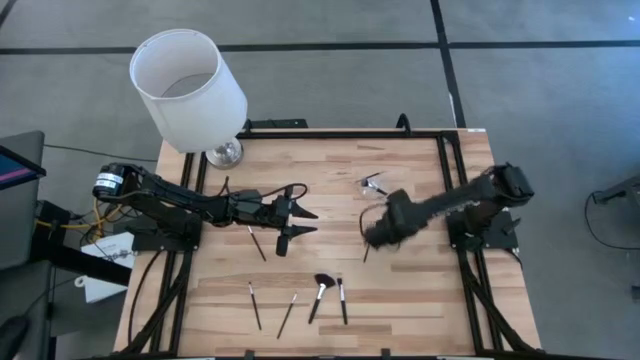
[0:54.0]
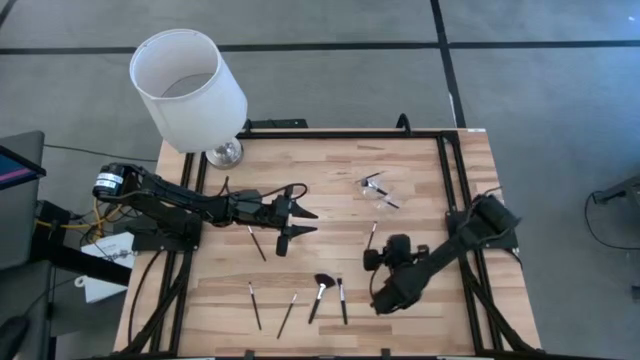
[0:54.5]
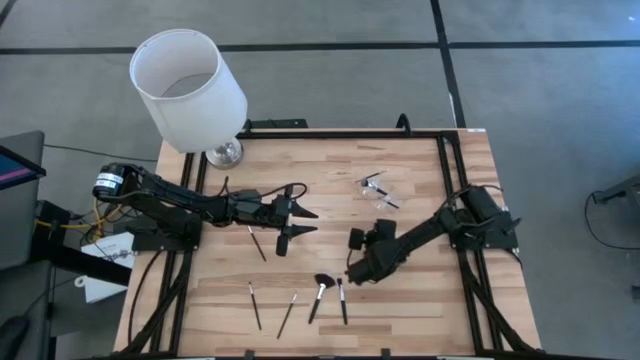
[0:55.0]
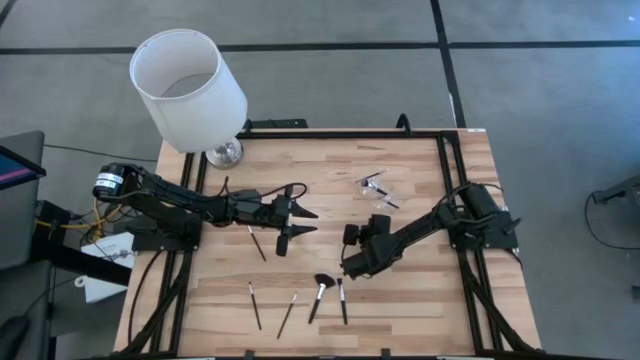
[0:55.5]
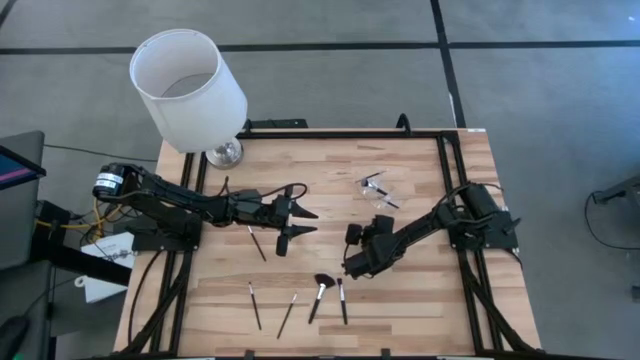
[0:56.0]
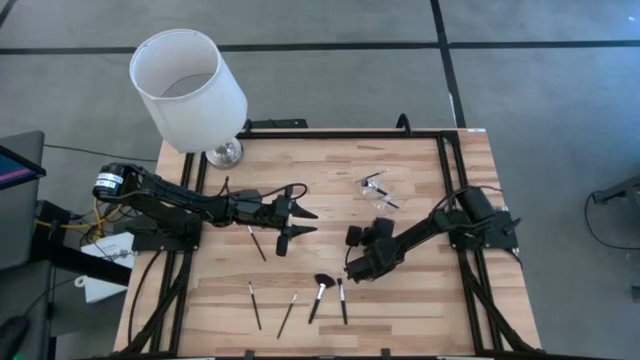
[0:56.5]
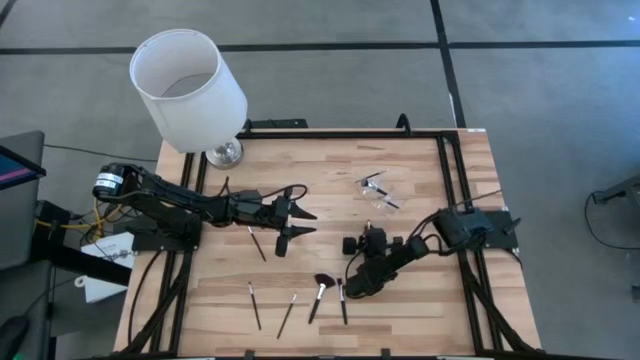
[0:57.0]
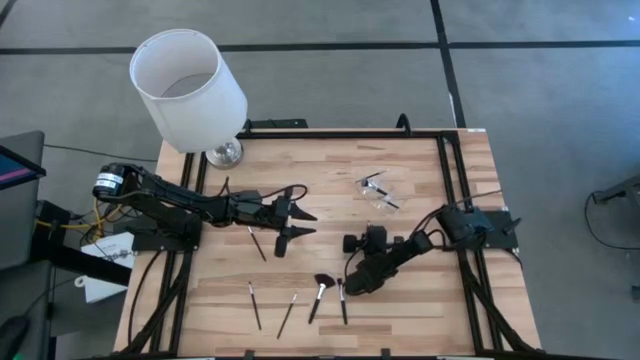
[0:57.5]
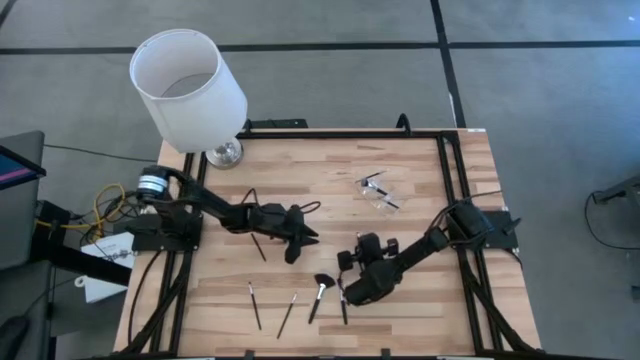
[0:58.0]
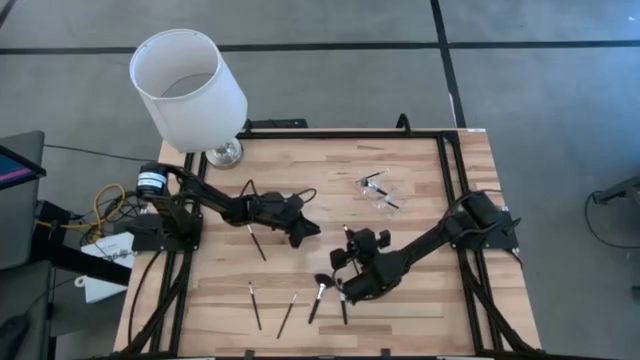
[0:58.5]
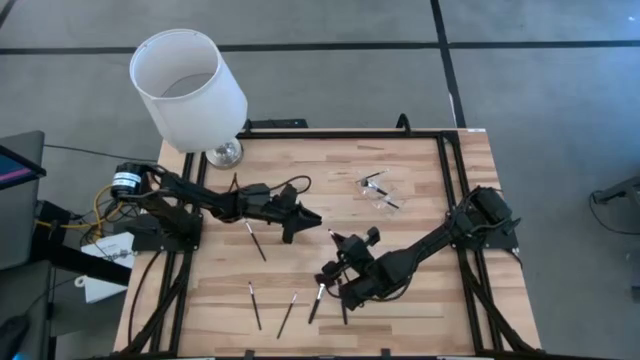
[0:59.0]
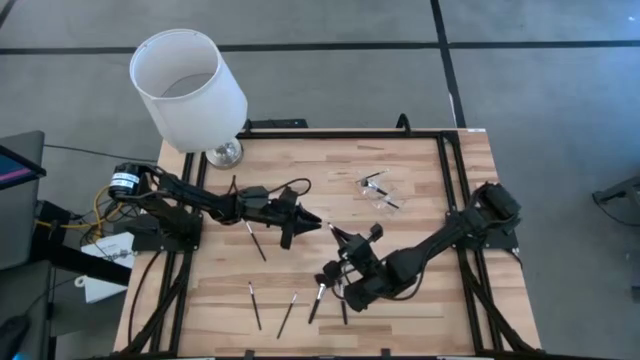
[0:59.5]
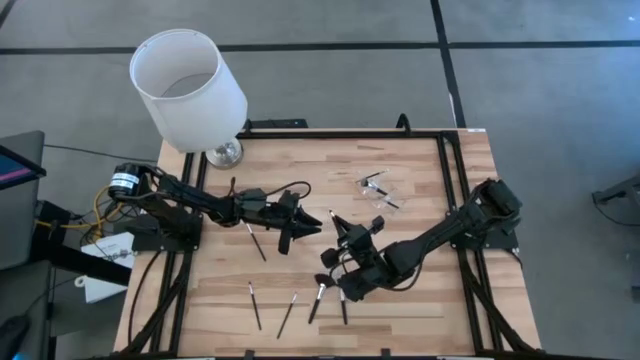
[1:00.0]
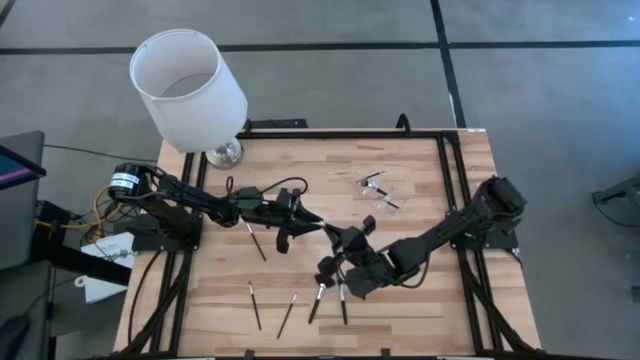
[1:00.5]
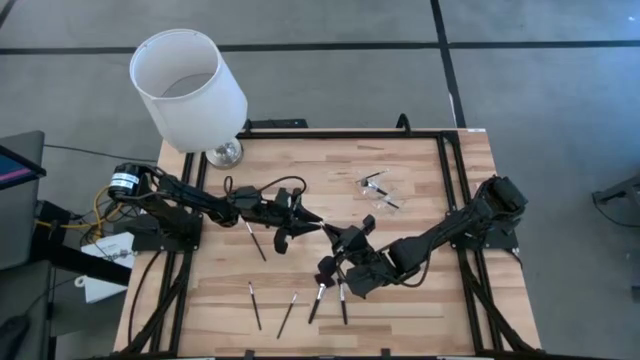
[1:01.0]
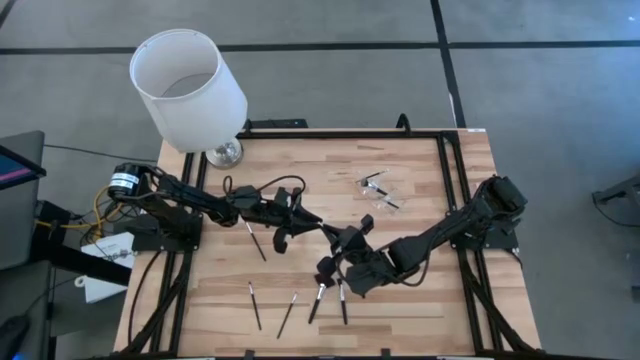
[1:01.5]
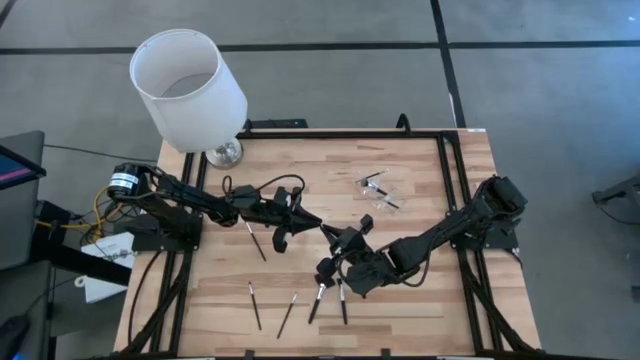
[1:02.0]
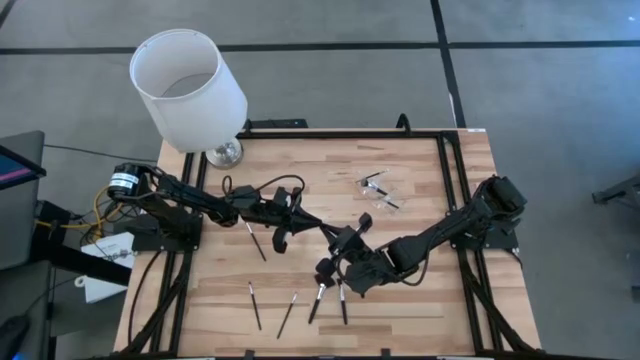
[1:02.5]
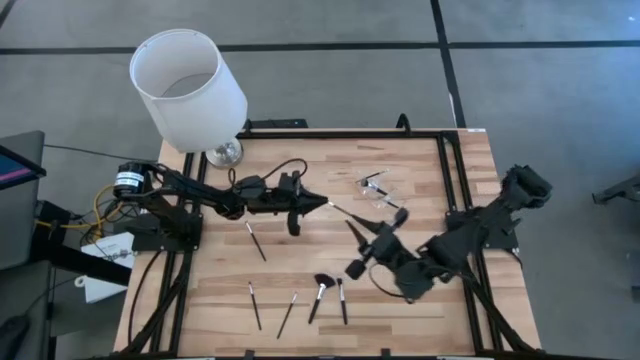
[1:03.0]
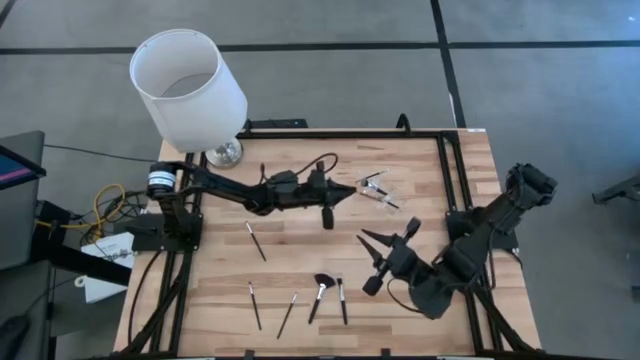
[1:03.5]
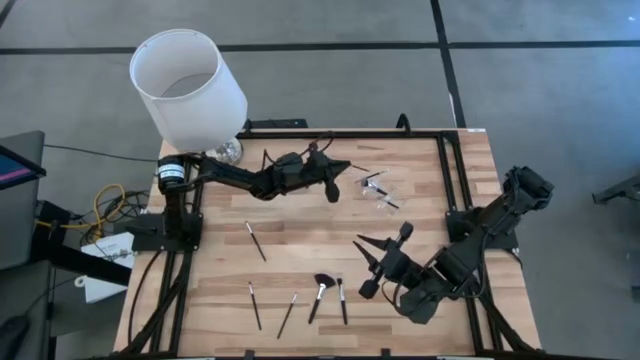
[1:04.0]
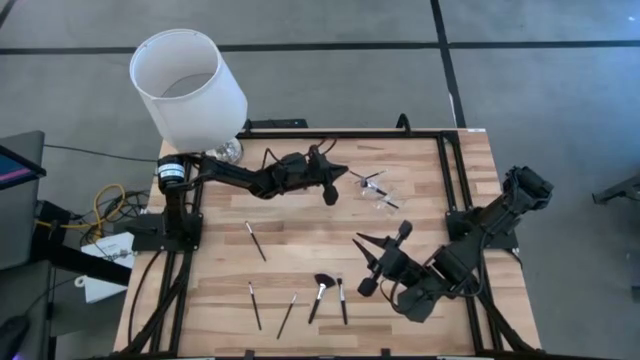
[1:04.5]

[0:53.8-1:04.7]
Task: Put items in baskets/containers
Put the eyeshadow brush into the transparent organizer

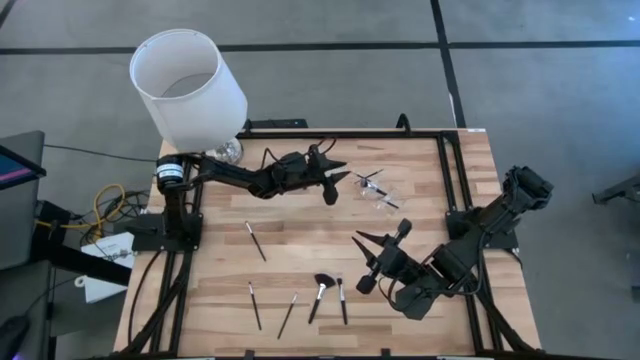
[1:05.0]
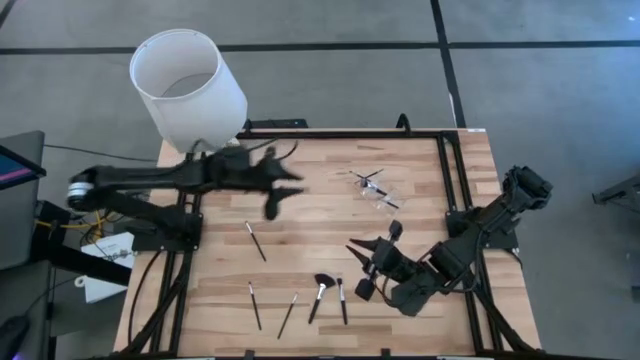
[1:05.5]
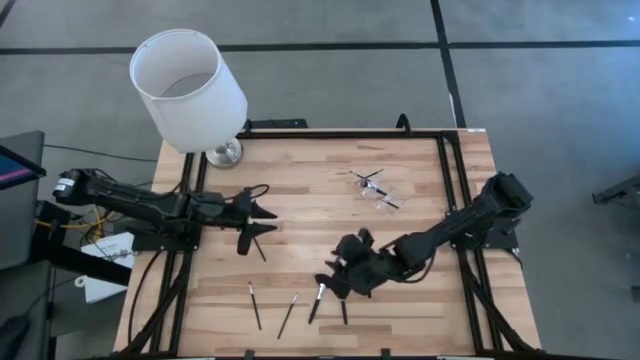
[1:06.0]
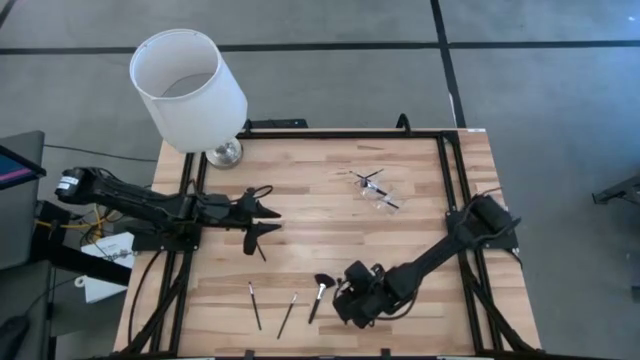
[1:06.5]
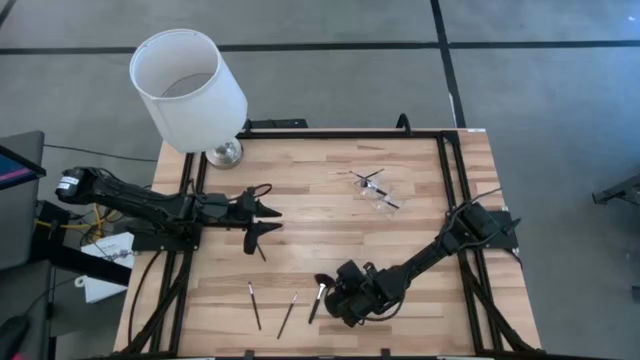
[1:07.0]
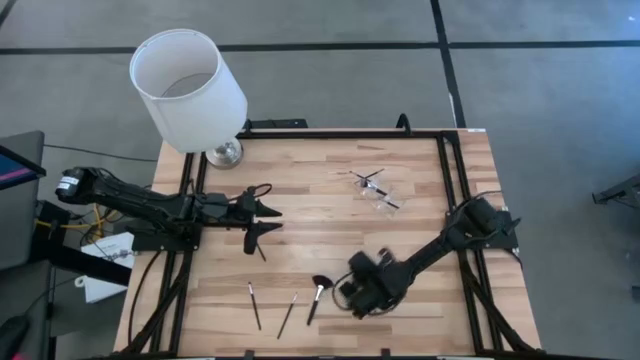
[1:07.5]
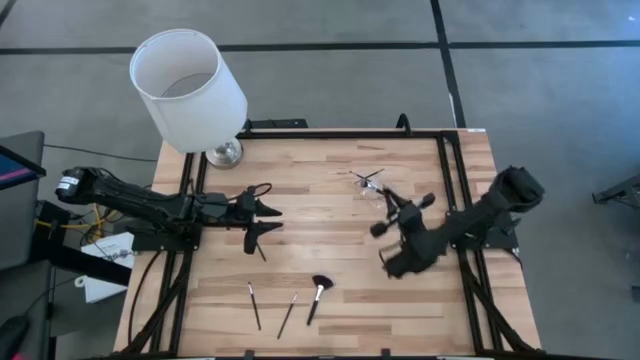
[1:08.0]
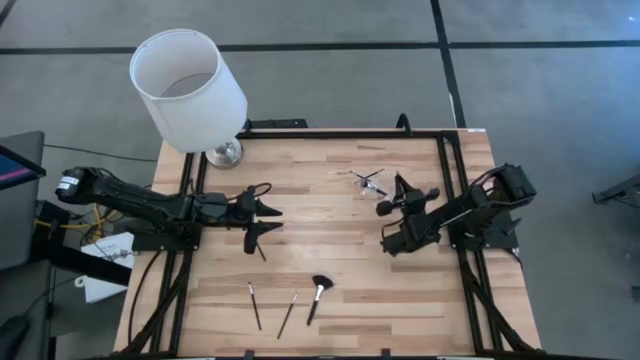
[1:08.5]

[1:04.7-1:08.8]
Put the blush brush into the transparent organizer

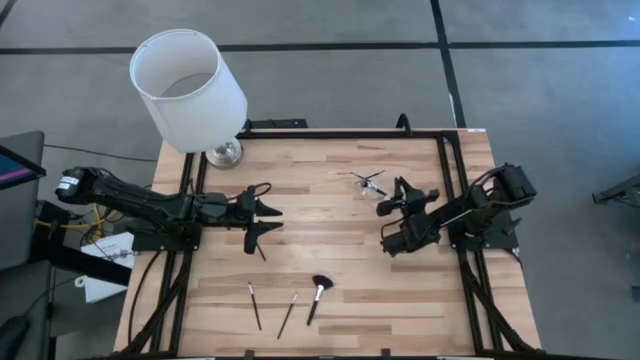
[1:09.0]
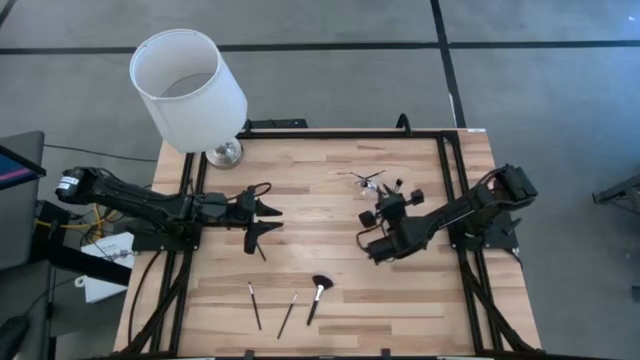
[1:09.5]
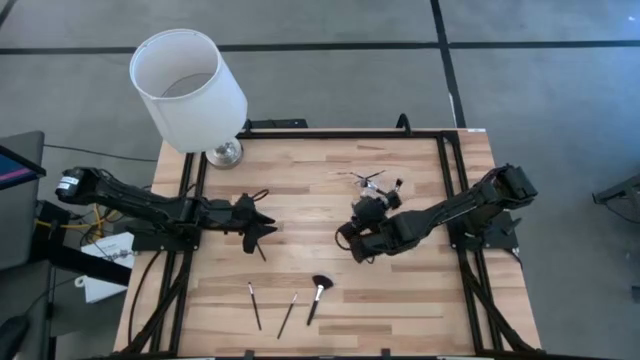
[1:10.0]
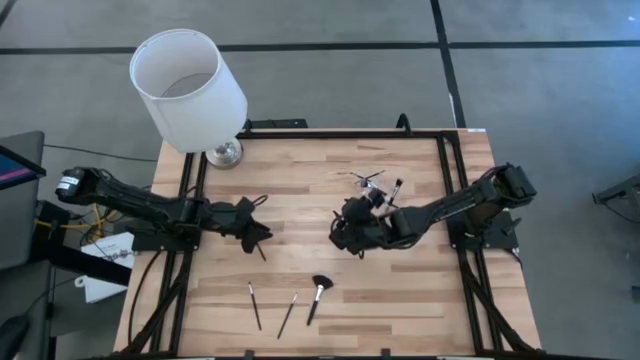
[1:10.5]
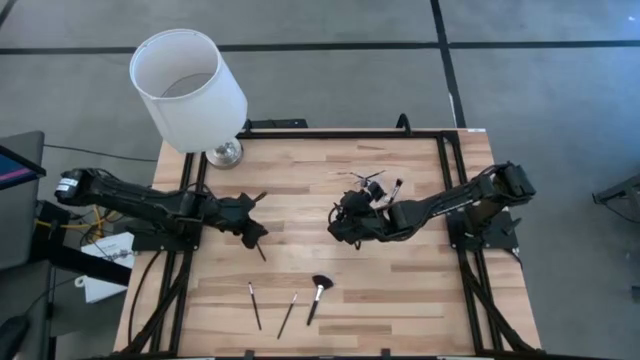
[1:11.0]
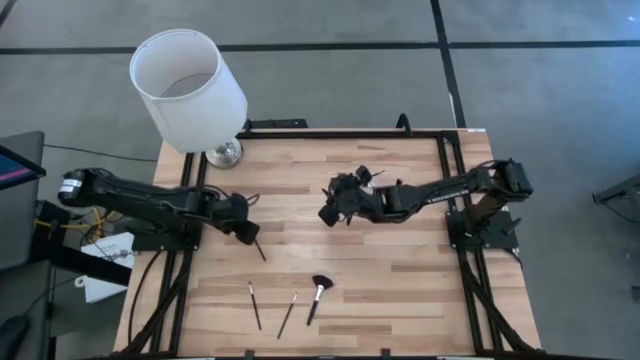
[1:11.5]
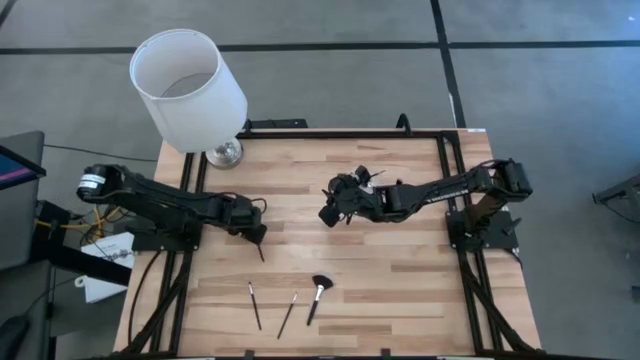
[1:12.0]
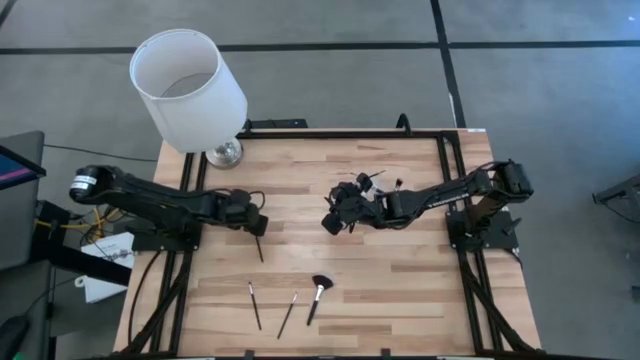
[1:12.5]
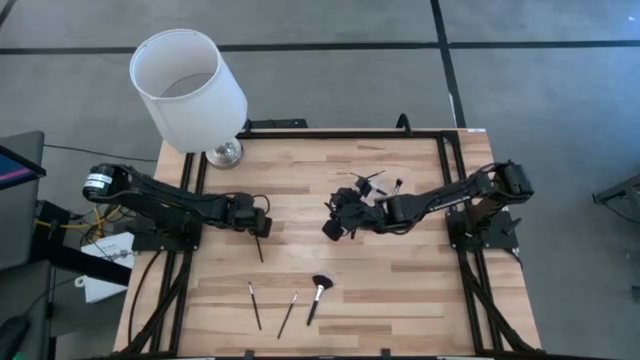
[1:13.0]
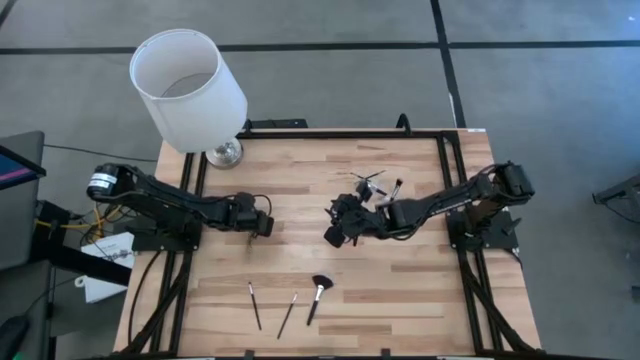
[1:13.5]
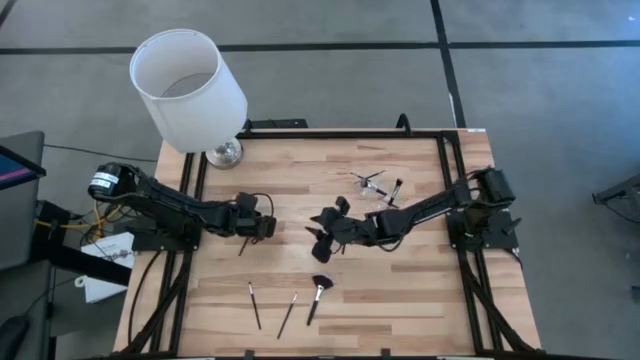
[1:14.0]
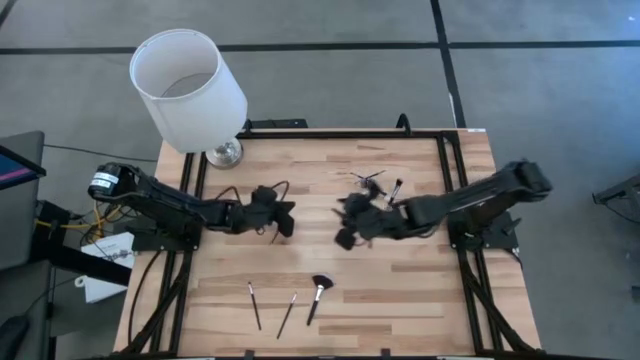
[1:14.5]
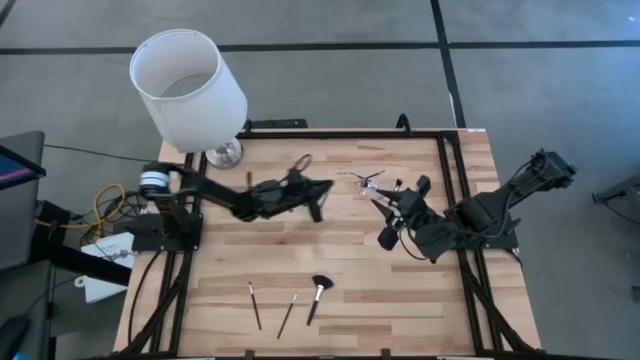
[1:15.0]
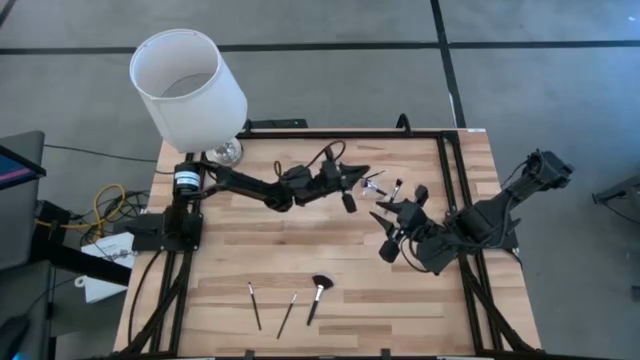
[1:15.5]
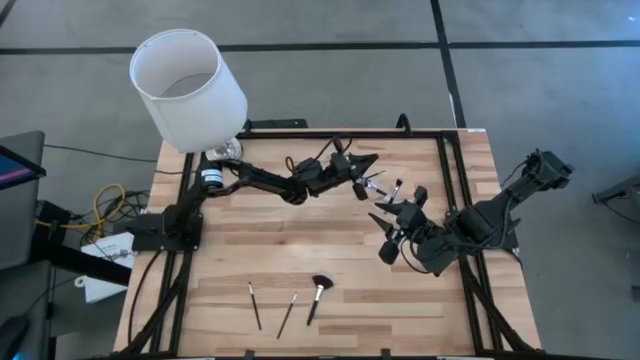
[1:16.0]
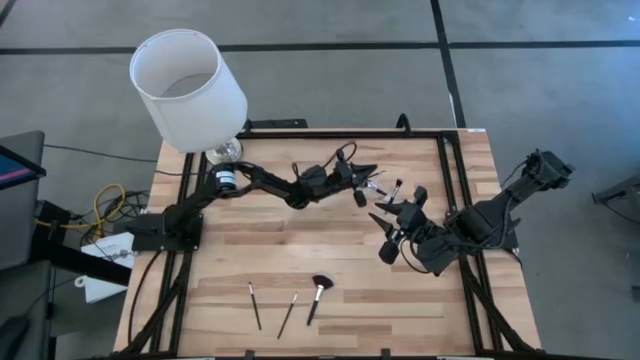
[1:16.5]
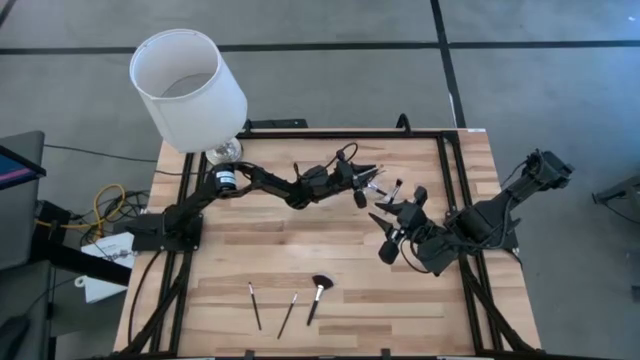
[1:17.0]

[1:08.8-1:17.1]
Put the eyeshadow brush into the transparent organizer
